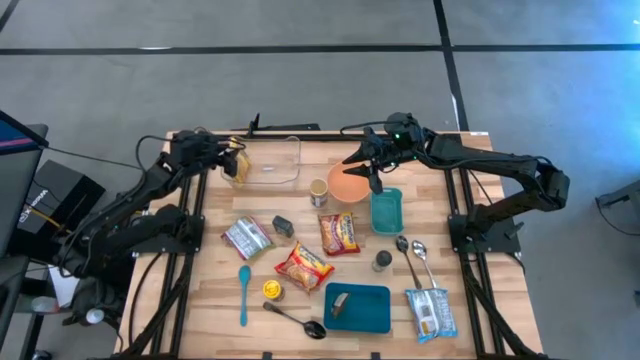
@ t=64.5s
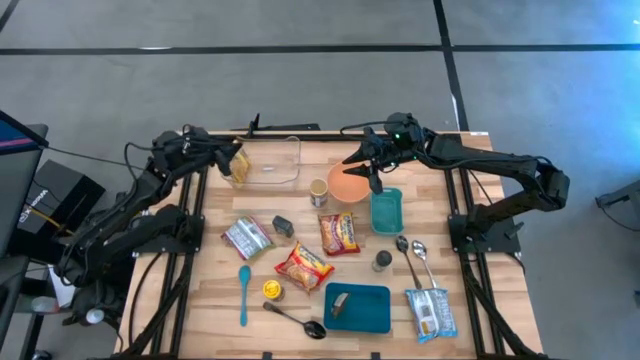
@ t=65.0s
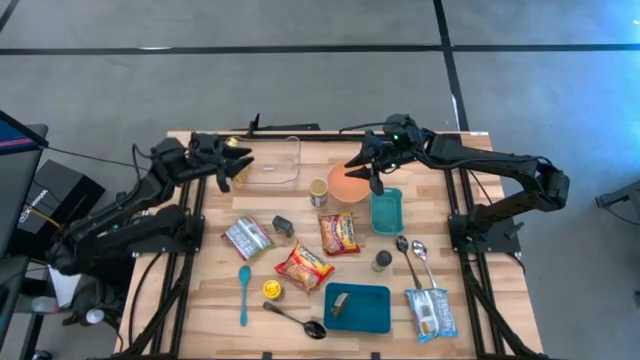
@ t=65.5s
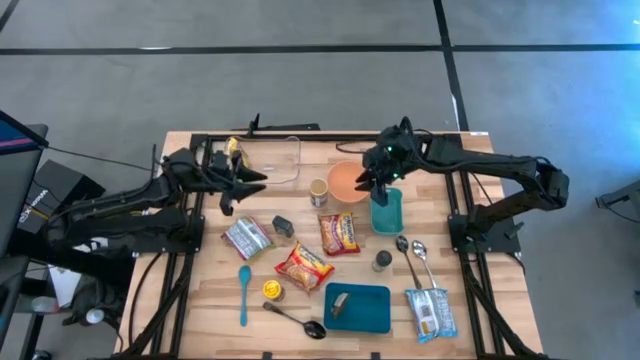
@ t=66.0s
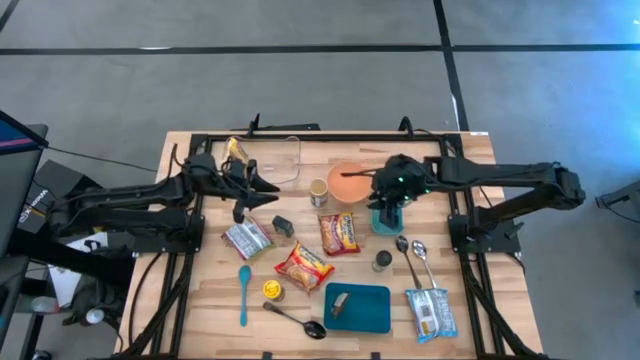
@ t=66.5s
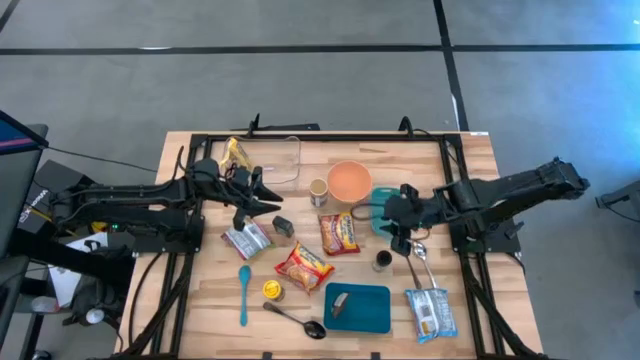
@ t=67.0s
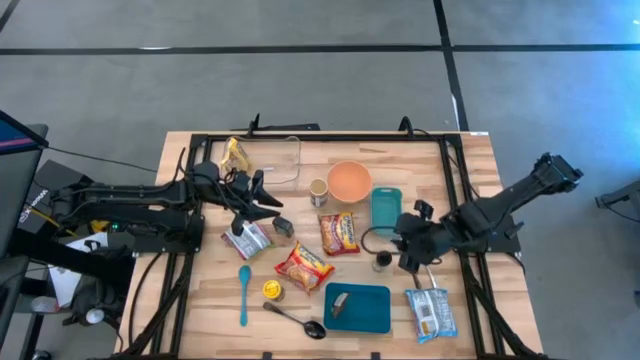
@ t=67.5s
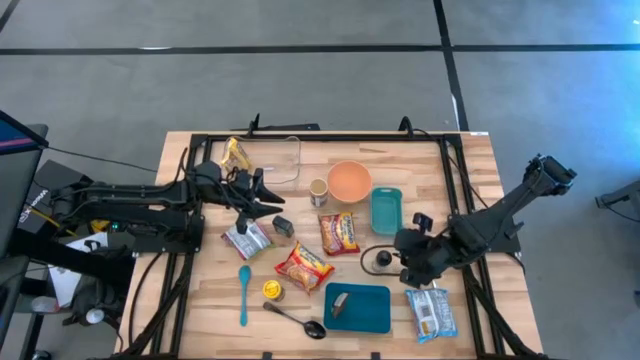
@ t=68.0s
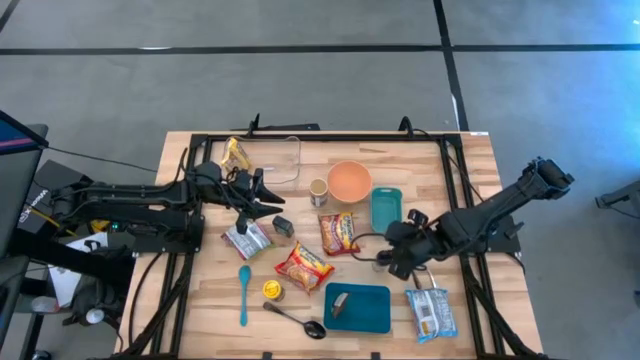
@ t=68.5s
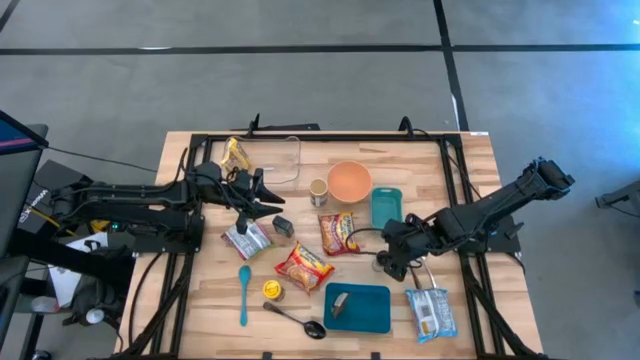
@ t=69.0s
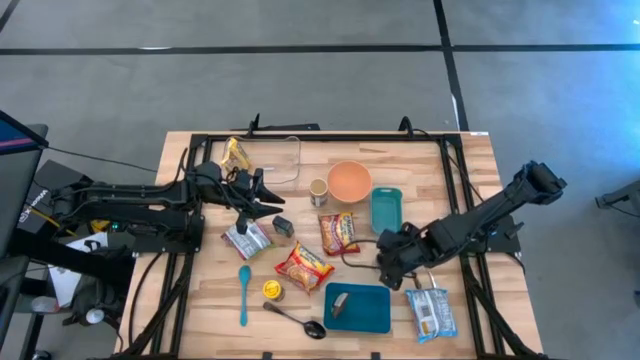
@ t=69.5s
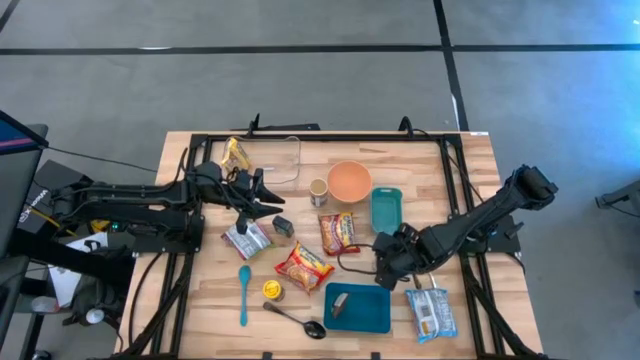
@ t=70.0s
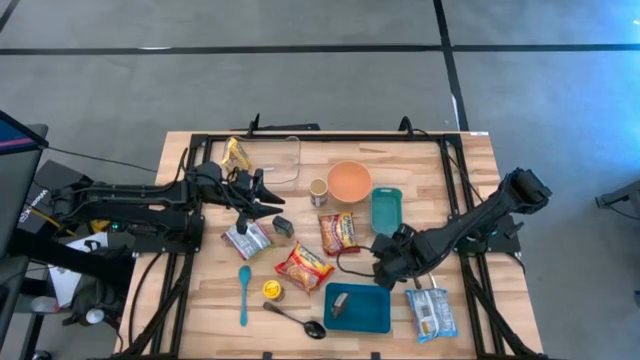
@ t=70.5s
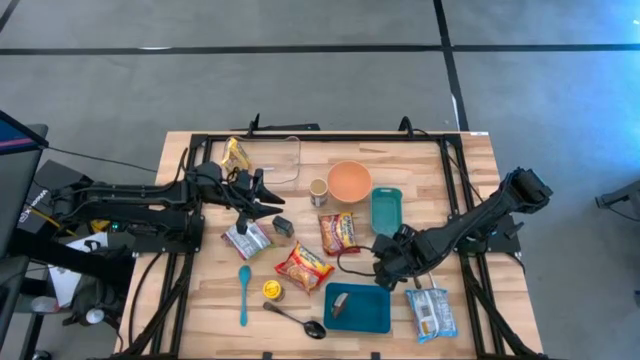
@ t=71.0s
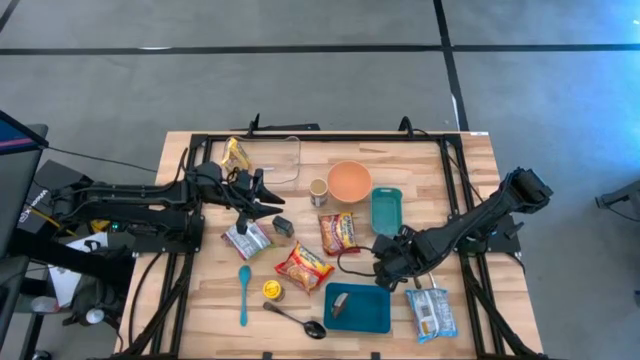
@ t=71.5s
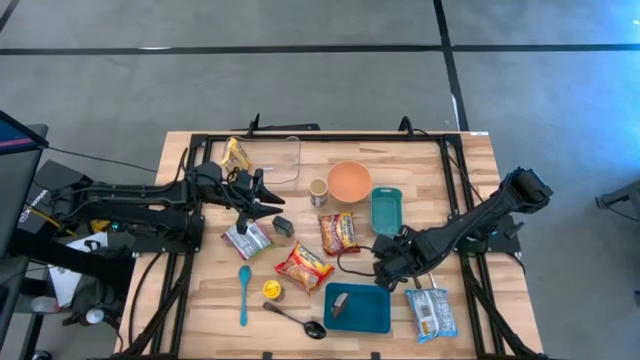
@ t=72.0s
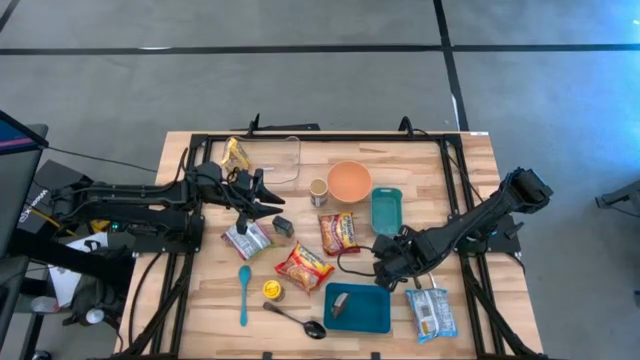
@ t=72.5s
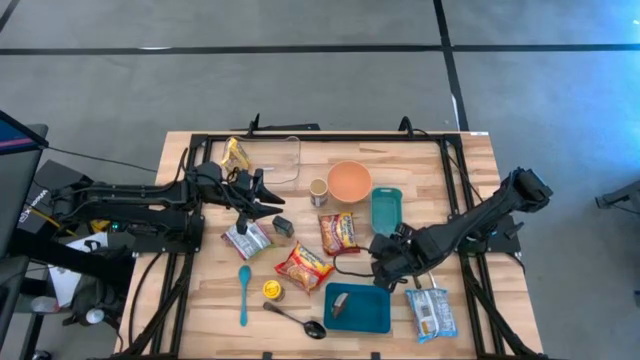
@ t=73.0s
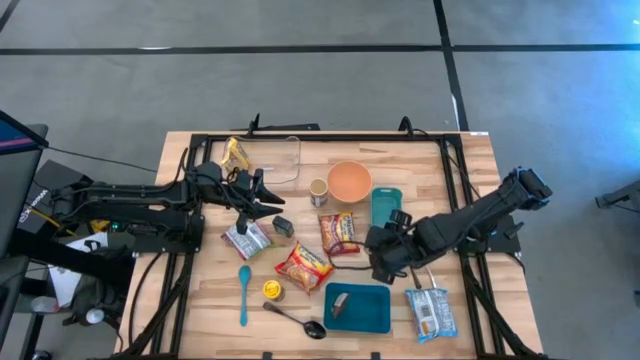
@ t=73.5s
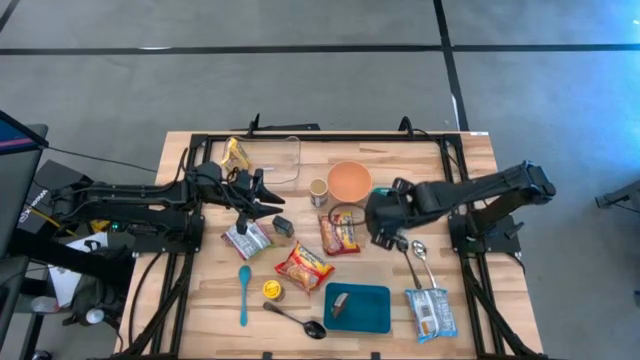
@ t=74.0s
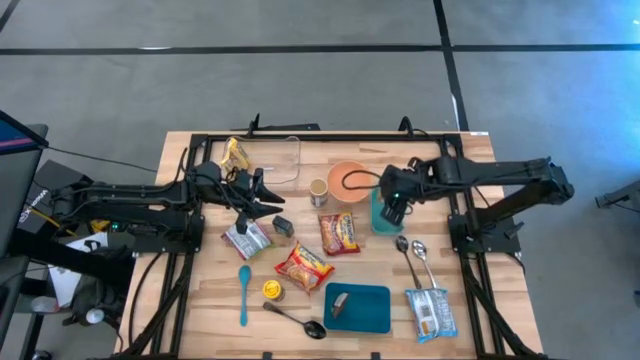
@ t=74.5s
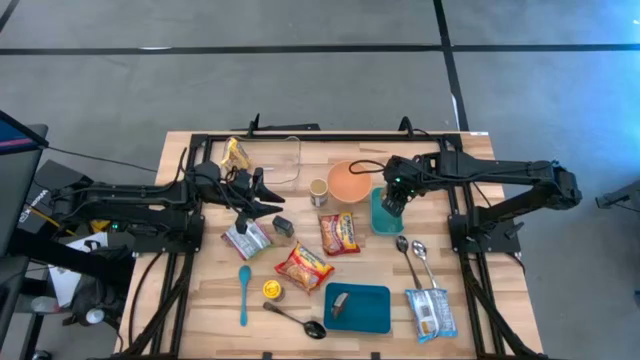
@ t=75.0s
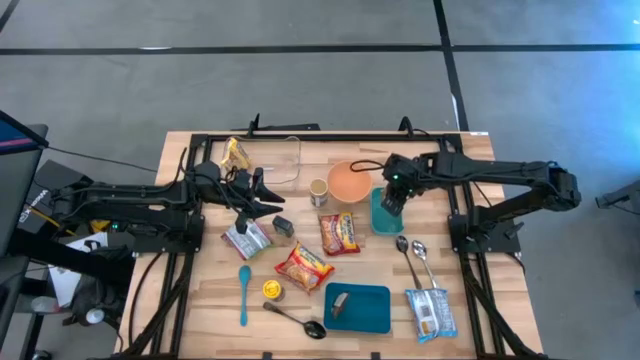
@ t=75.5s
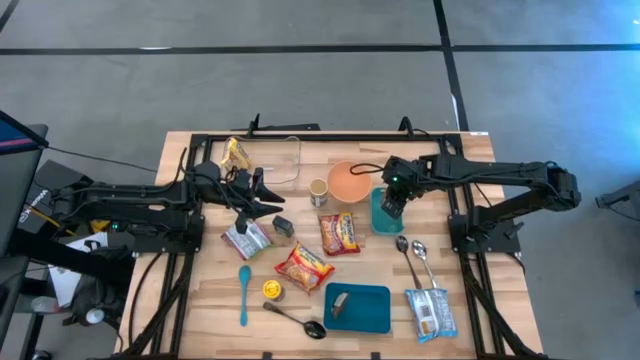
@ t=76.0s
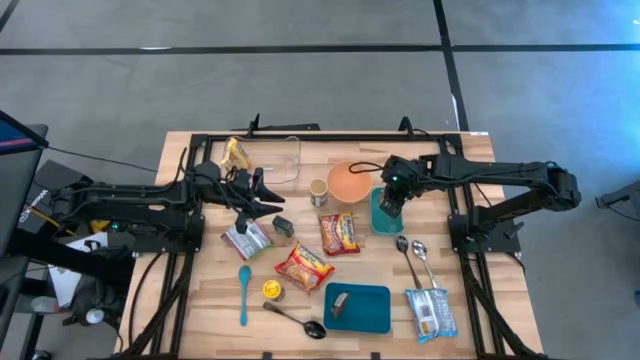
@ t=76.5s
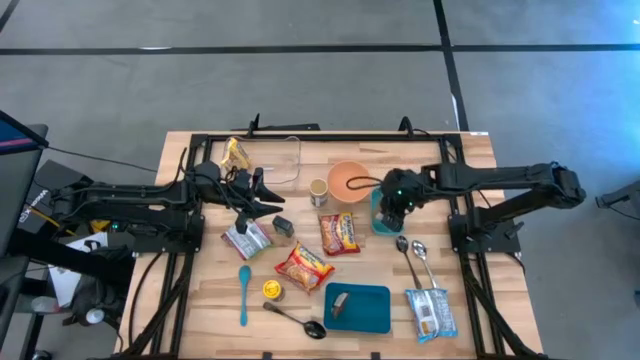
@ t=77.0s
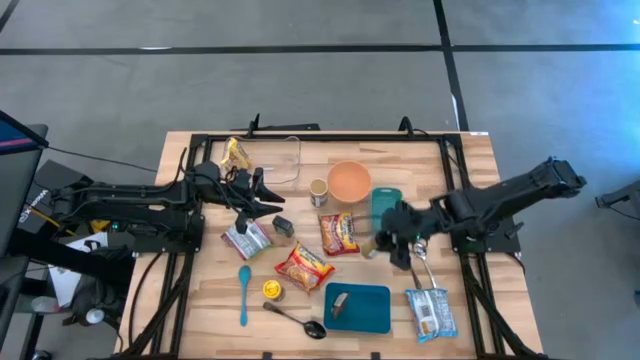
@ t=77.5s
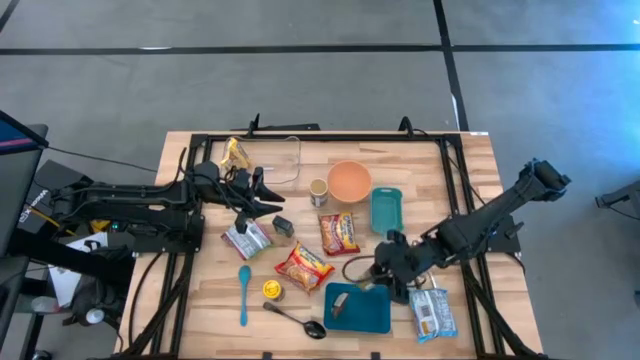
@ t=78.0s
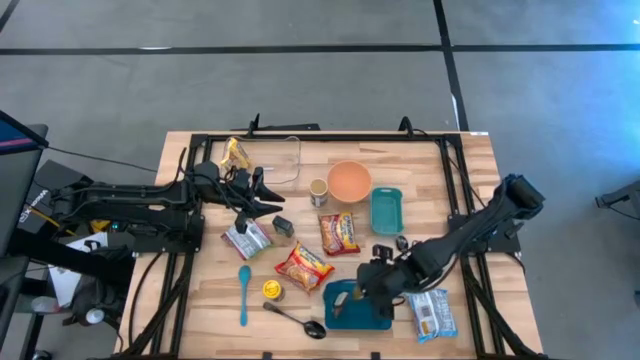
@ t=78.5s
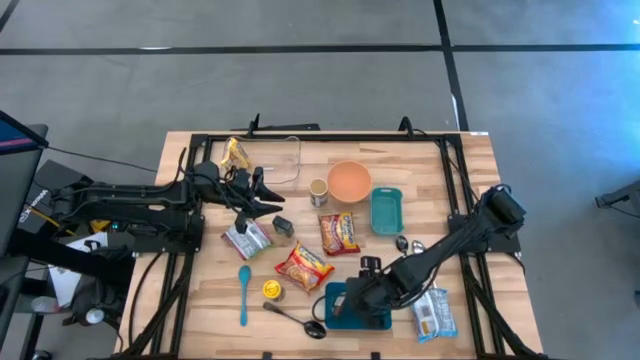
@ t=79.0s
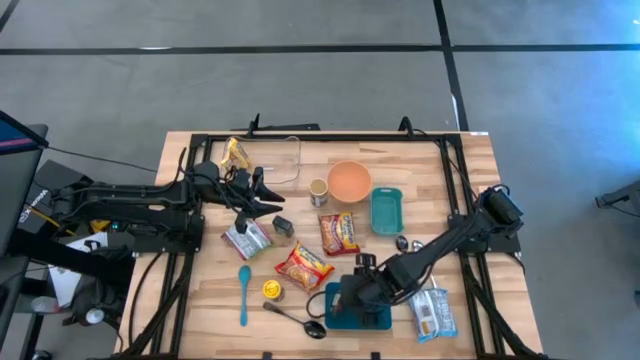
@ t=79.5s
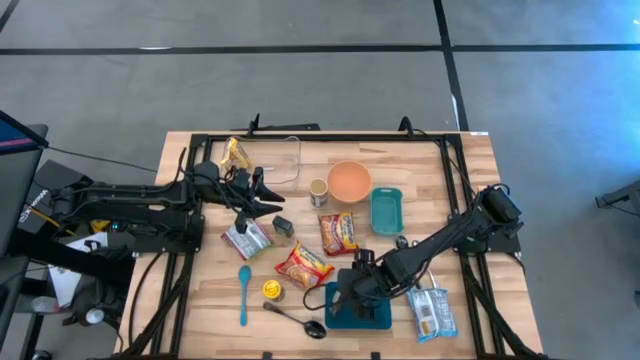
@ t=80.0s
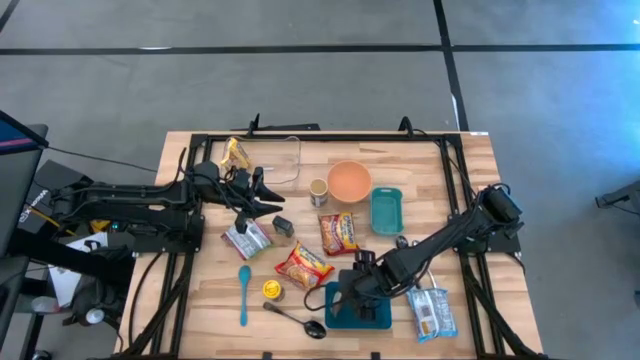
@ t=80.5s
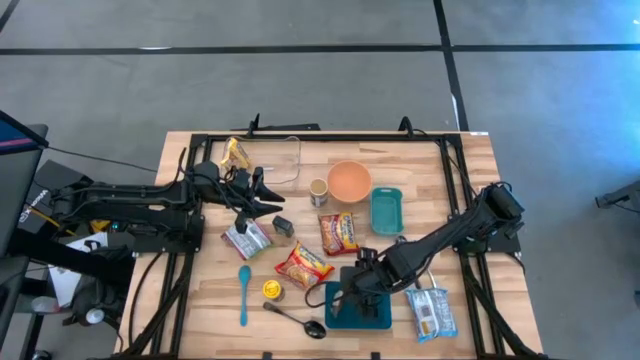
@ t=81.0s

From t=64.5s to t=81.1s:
Task: Pick & Place Food Item
Put the black seasoning bottle into the blue bin

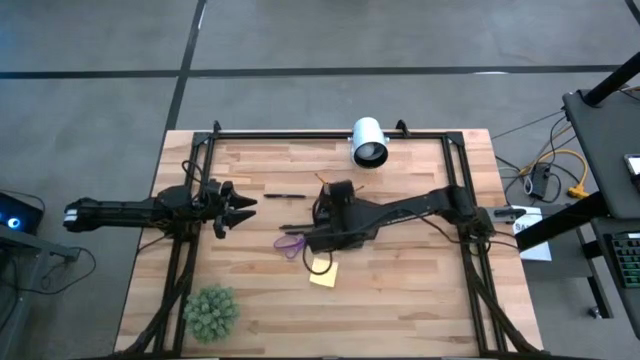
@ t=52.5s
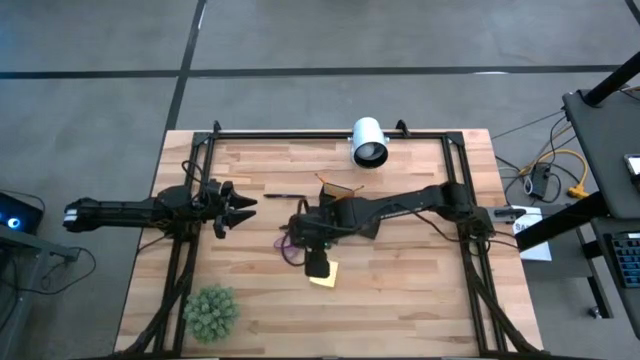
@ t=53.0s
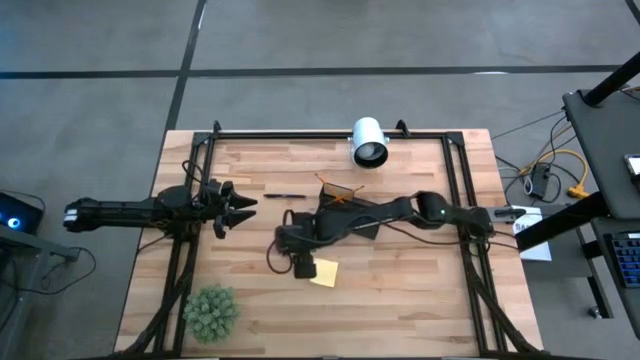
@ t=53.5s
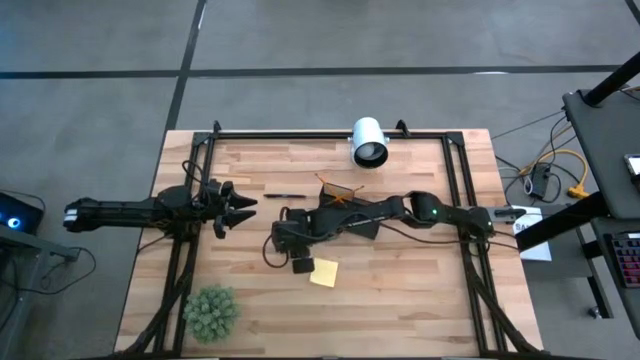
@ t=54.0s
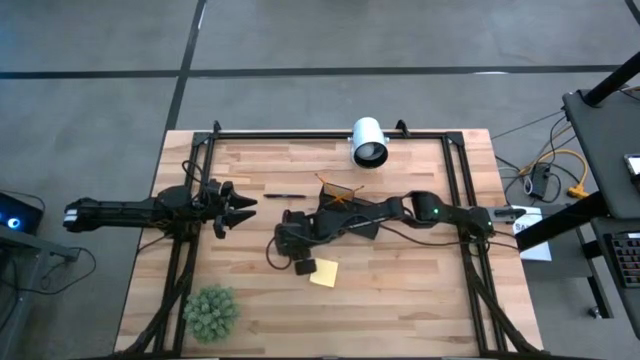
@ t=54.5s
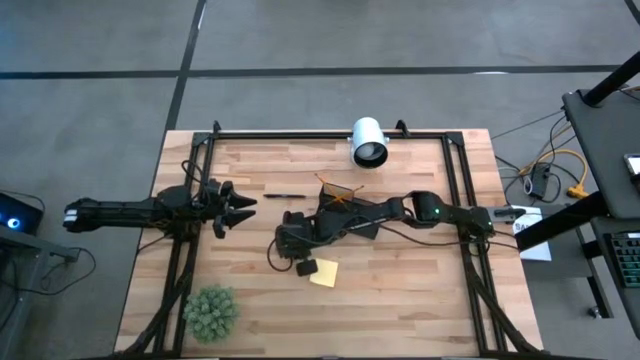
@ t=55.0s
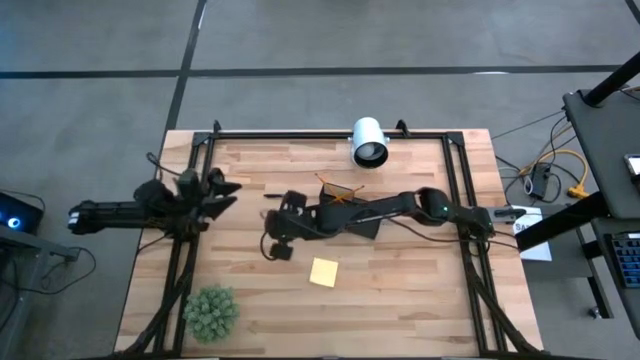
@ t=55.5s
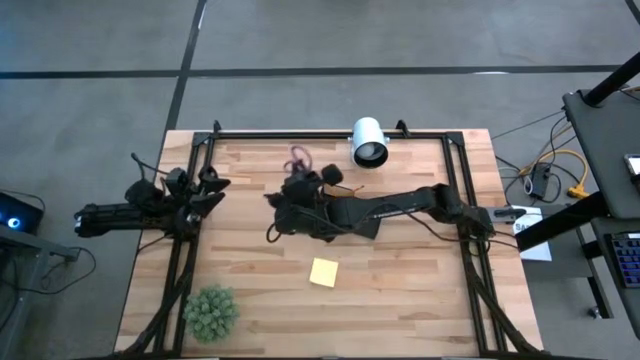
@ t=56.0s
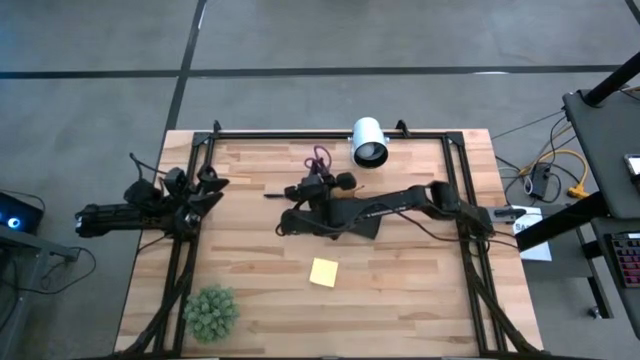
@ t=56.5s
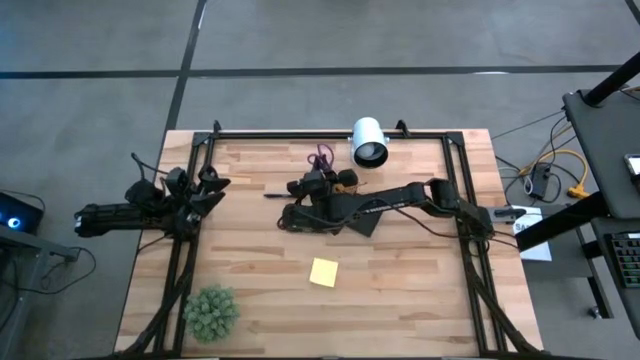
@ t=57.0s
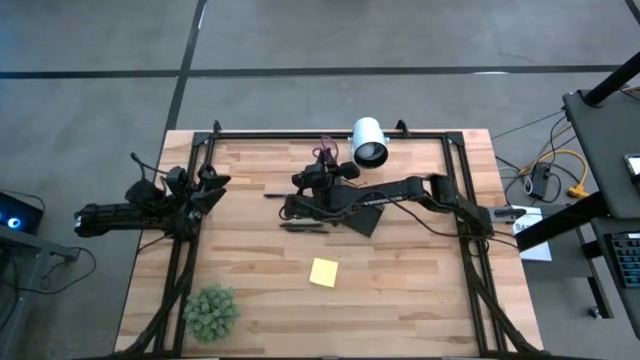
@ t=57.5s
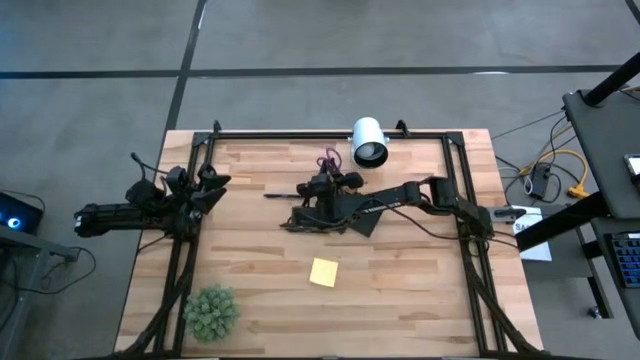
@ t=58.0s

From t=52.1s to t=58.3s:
Task: Pick and place office supplies into organizer
Put the purple scissors into the black mesh organizer
